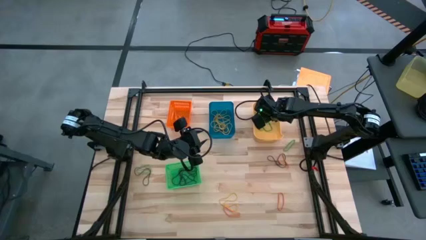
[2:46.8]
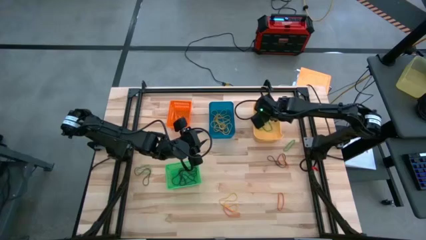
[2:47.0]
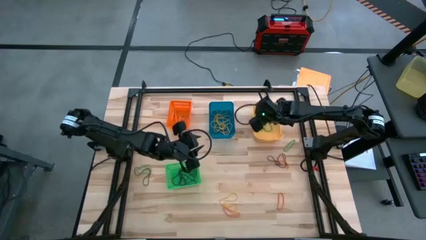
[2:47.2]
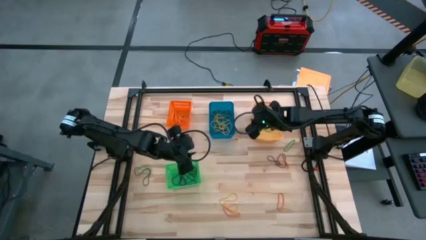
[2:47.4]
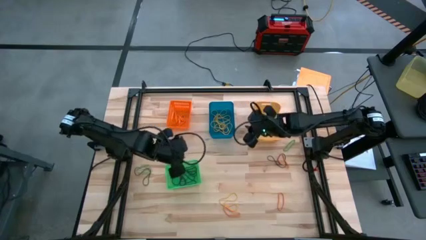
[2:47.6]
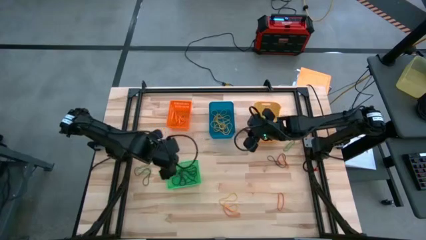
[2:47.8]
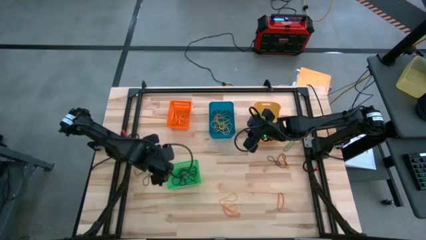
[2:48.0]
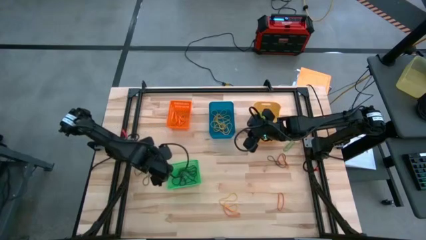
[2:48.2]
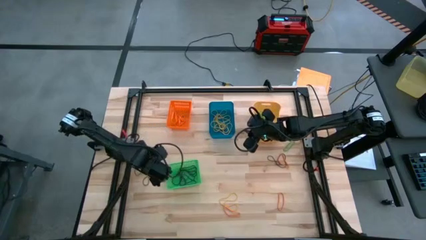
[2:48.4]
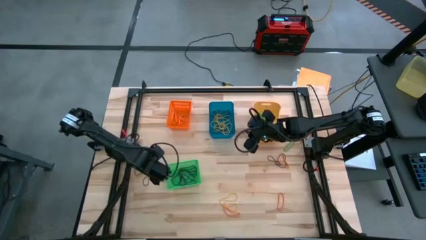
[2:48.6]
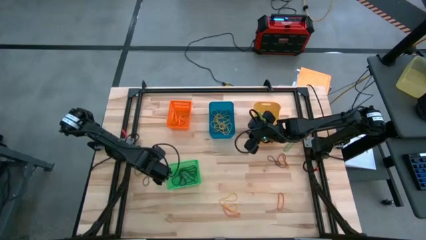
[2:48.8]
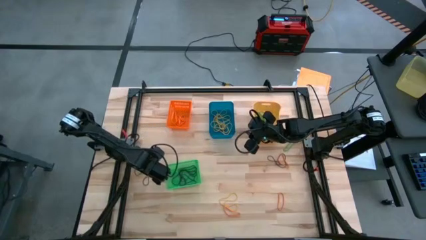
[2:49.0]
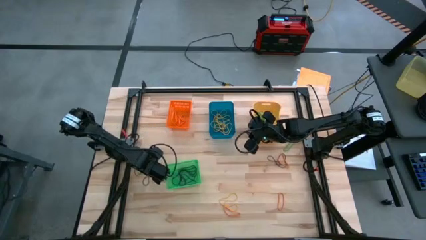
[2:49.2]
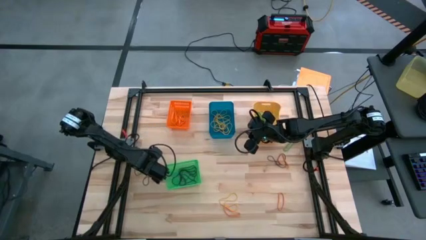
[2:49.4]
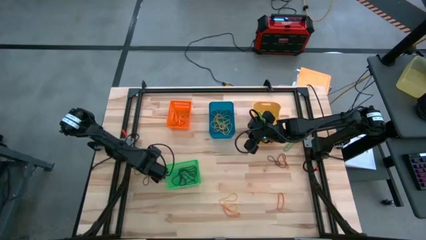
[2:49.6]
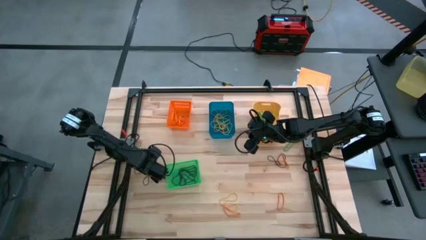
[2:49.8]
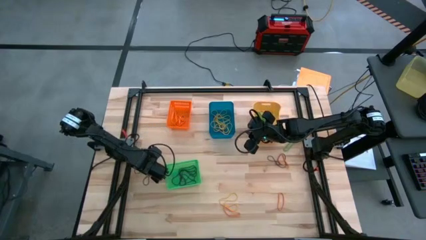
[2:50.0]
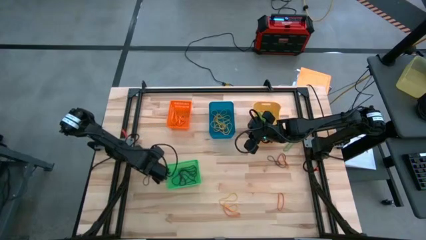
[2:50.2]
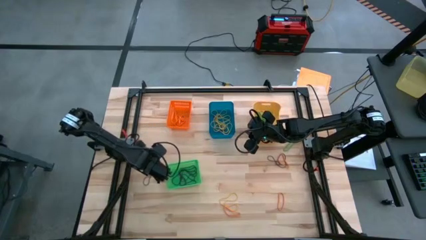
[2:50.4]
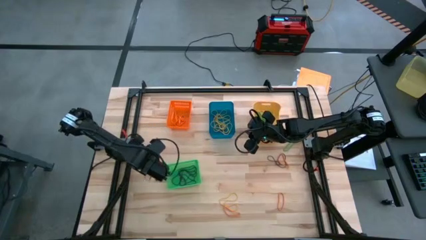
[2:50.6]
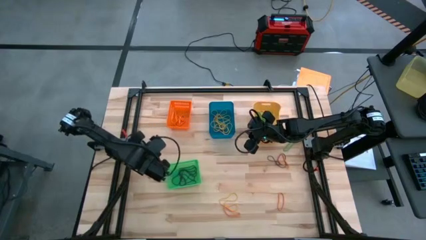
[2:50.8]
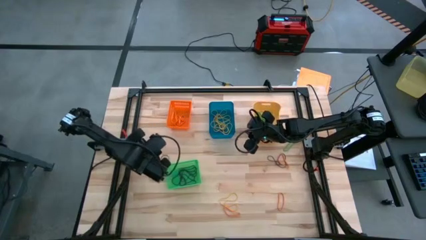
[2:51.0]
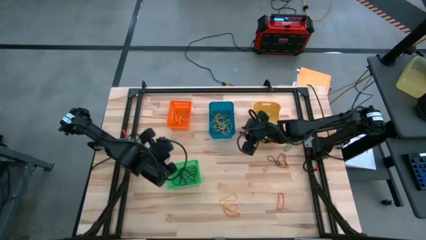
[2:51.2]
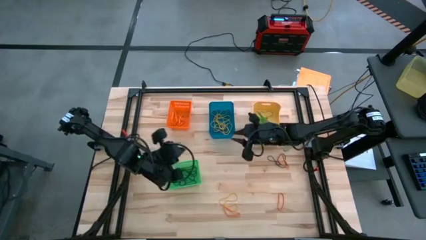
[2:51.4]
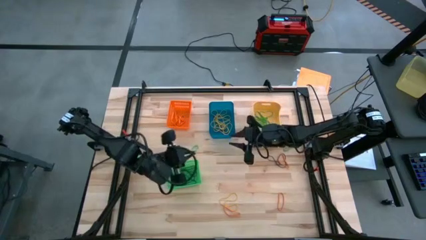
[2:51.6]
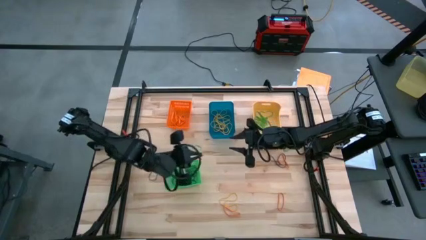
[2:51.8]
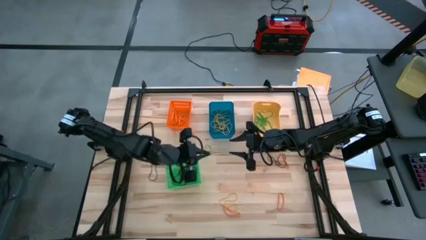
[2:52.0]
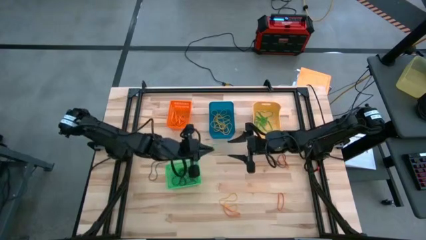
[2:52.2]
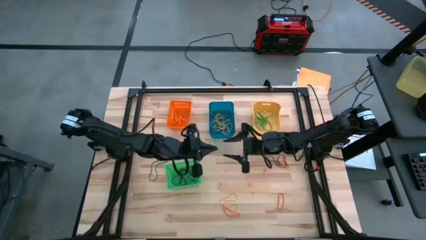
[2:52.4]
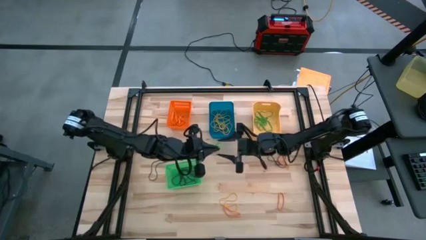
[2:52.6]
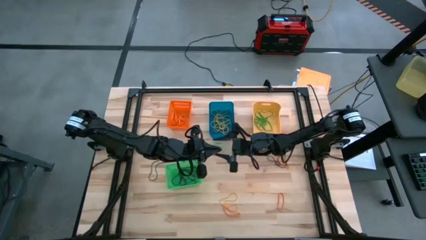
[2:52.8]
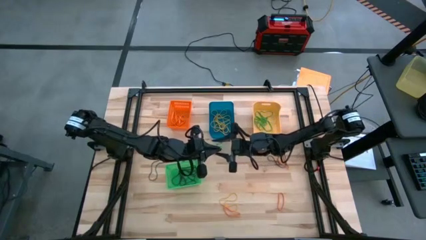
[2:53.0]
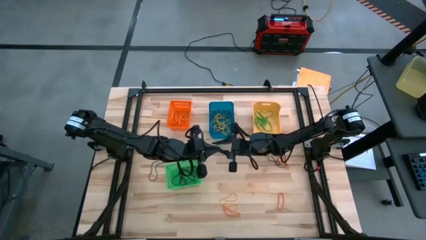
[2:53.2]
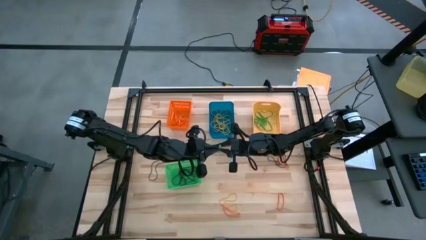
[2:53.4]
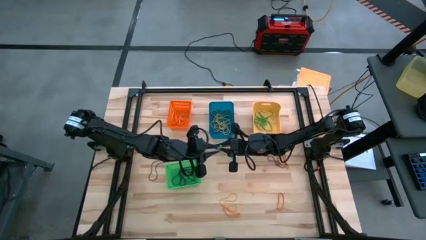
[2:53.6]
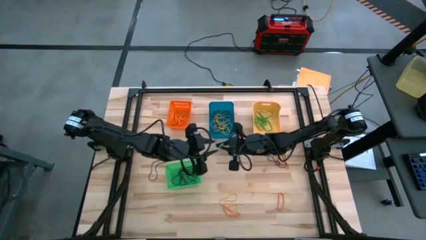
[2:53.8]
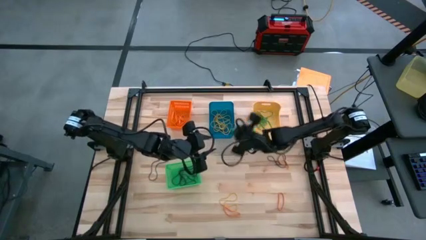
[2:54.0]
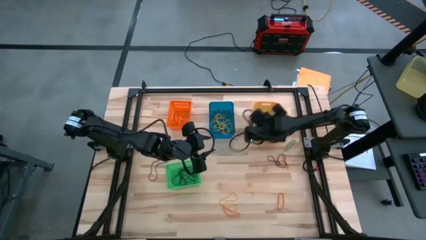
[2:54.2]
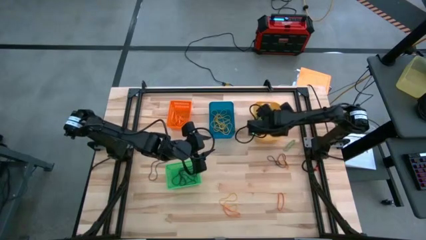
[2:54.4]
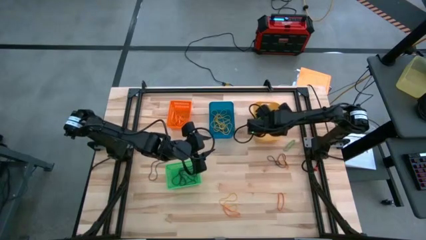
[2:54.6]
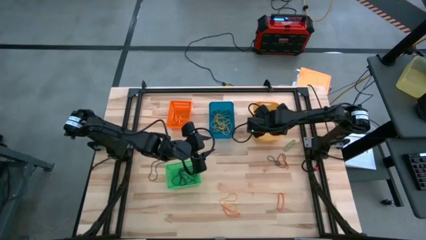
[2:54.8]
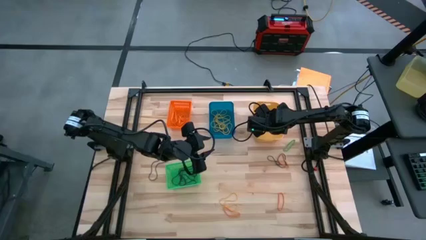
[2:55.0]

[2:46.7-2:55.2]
Task: Sort rubber bands into baskets
Put the green rubberband into the yellow bin

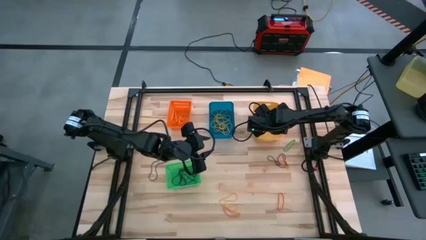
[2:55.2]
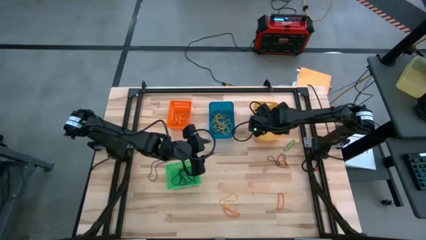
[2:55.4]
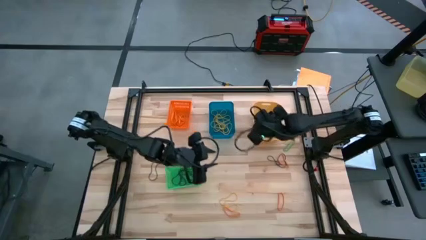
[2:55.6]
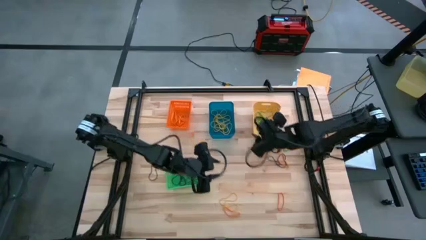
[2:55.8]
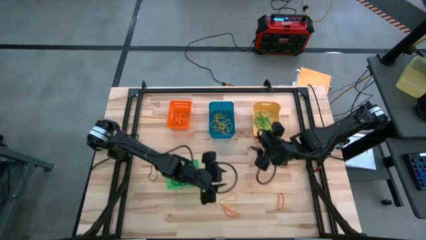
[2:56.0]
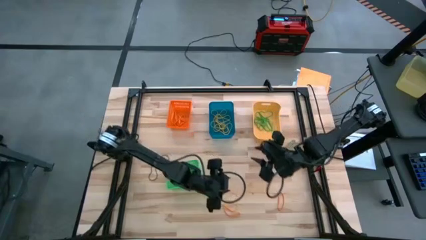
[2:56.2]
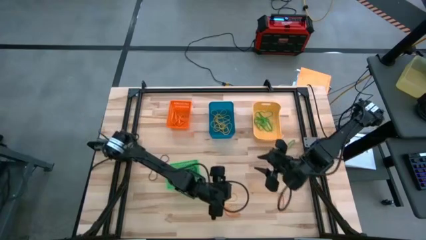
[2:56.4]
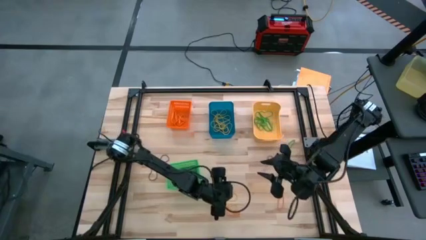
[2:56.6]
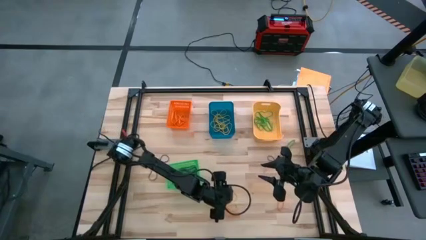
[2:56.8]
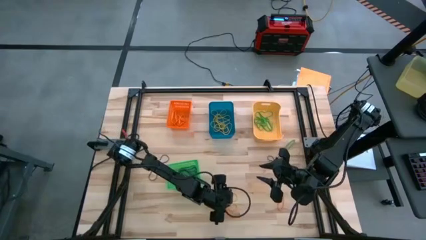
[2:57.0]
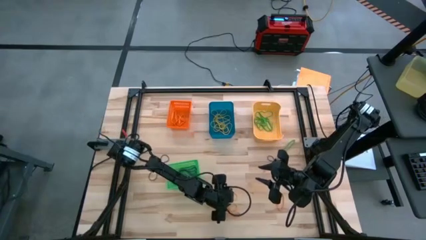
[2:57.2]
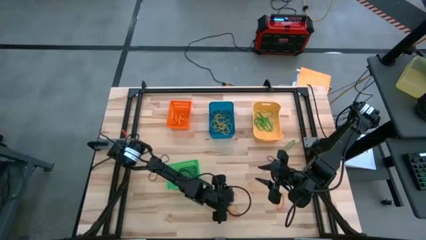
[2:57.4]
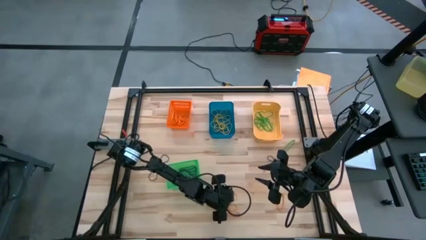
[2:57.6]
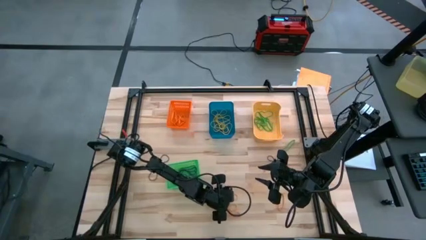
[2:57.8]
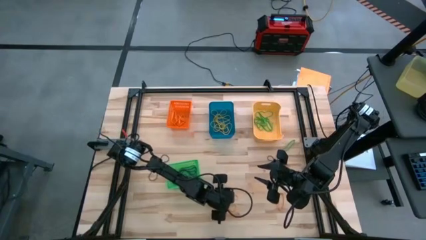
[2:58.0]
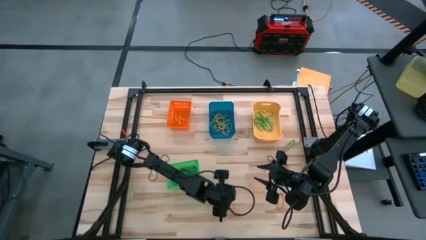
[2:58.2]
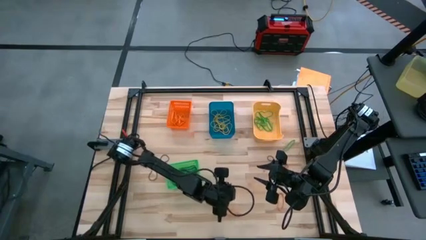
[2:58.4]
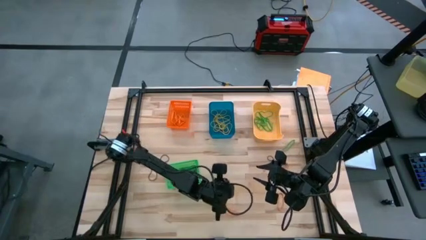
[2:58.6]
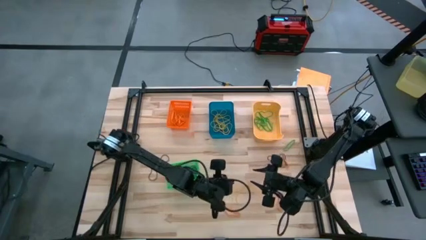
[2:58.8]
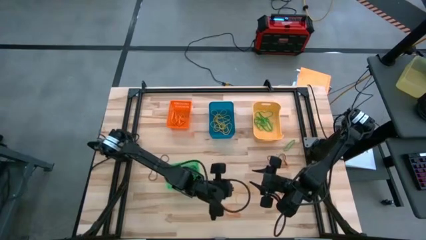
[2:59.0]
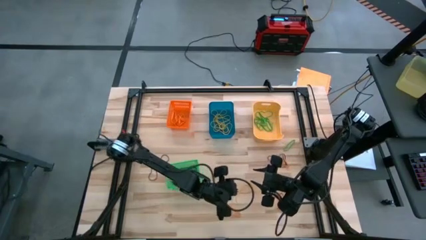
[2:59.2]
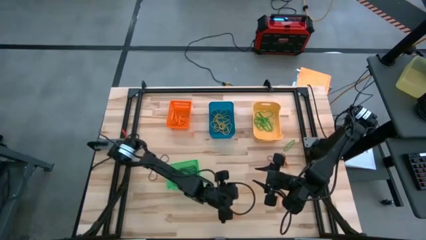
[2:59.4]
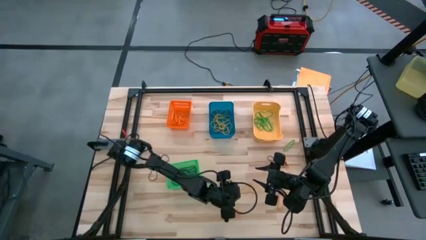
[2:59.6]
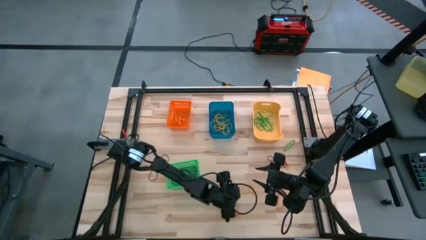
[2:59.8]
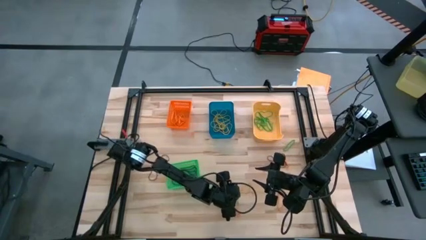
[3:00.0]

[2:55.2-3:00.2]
Put the yellow rubberband into the blue bin

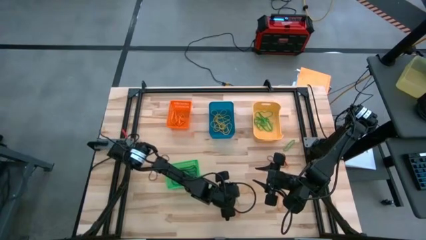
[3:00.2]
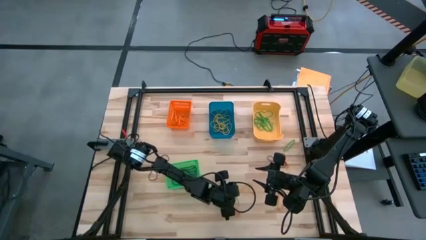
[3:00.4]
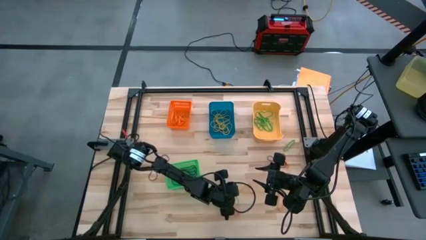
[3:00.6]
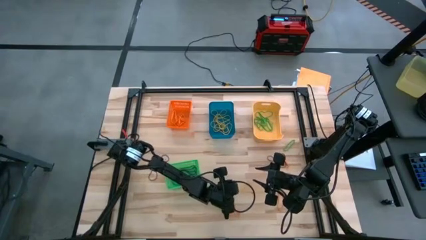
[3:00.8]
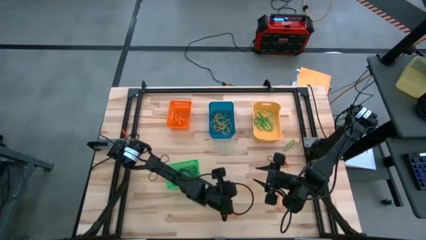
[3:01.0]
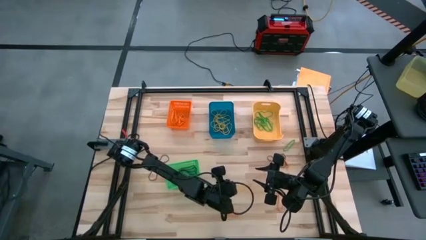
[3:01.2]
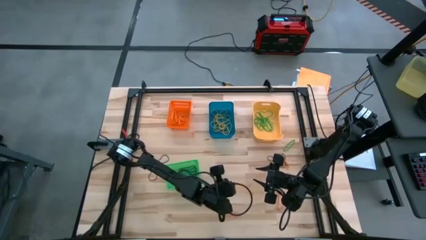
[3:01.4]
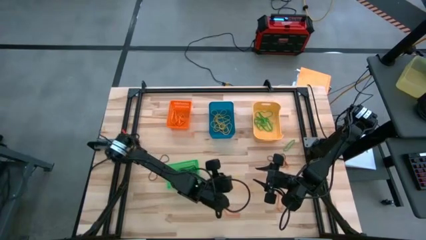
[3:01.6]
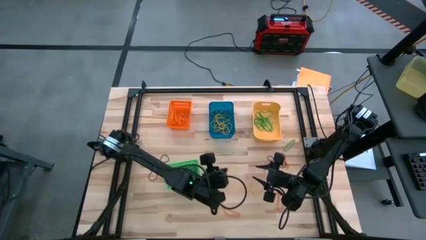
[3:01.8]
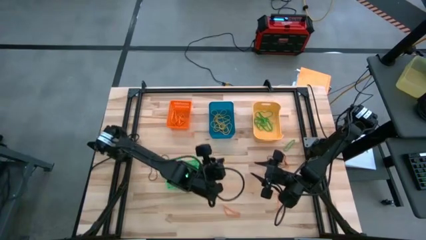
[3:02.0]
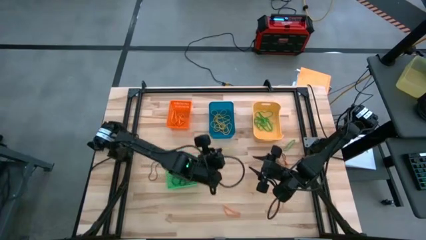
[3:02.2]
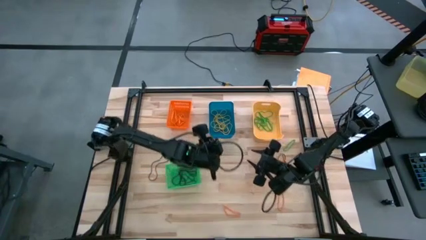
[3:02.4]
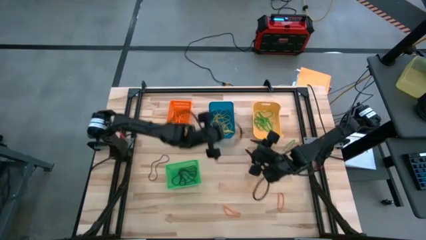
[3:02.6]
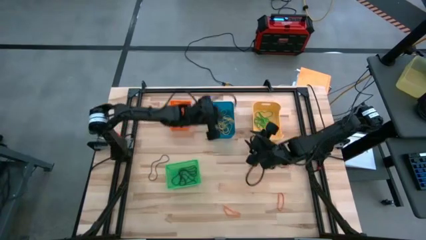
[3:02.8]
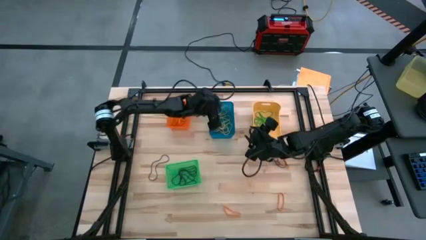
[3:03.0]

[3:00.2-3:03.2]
Put the yellow rubberband into the blue bin
